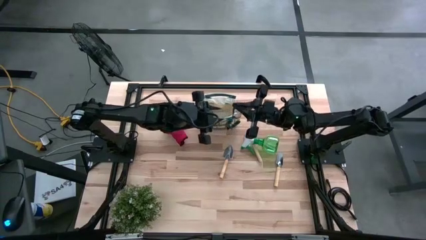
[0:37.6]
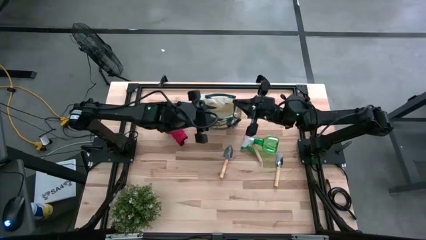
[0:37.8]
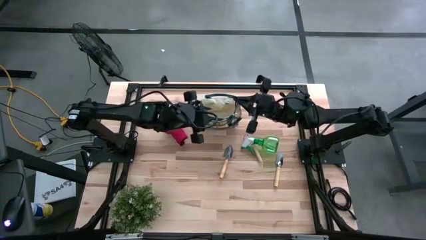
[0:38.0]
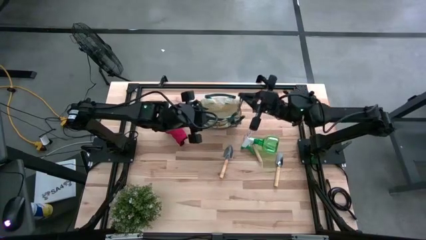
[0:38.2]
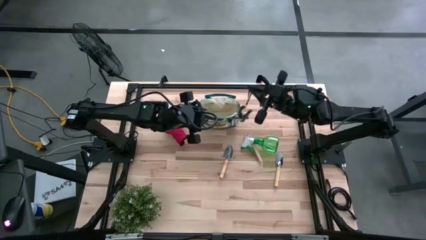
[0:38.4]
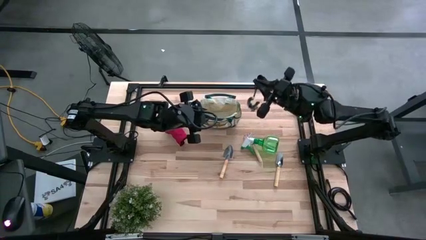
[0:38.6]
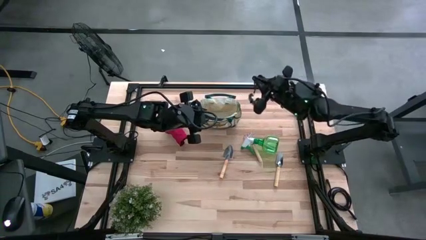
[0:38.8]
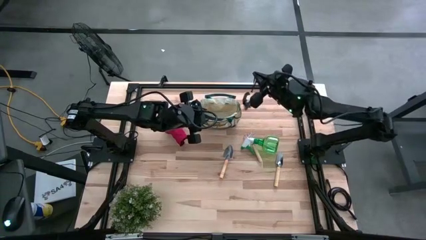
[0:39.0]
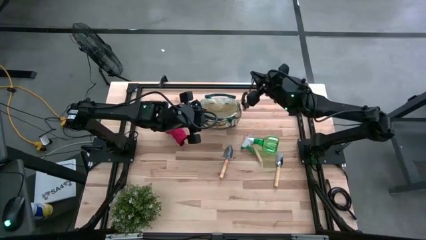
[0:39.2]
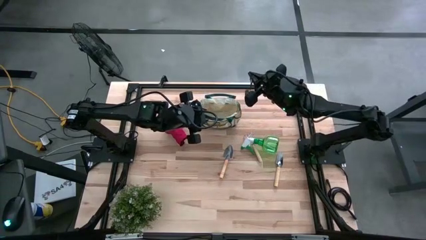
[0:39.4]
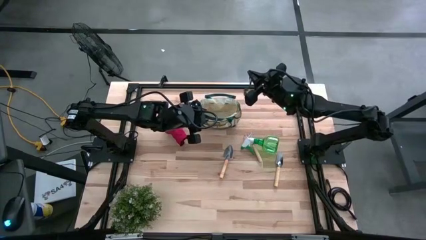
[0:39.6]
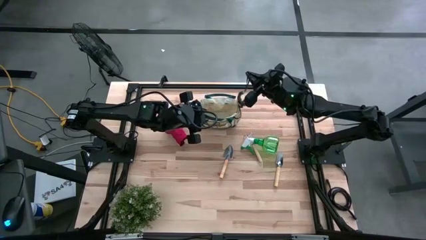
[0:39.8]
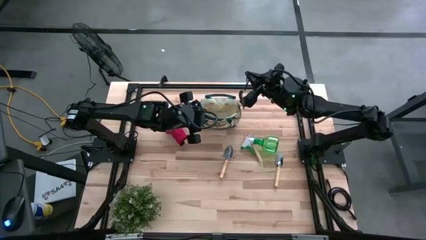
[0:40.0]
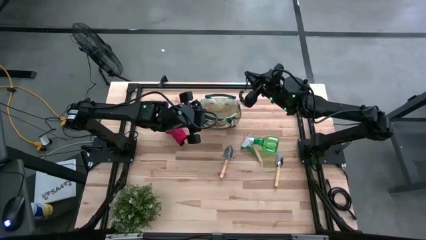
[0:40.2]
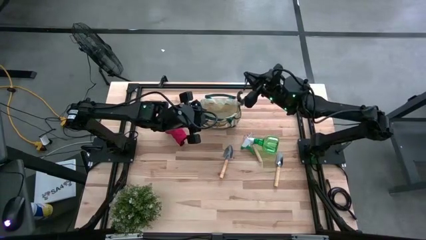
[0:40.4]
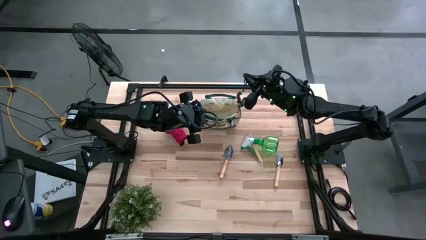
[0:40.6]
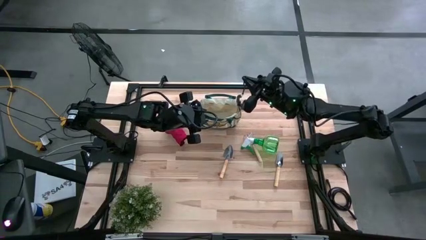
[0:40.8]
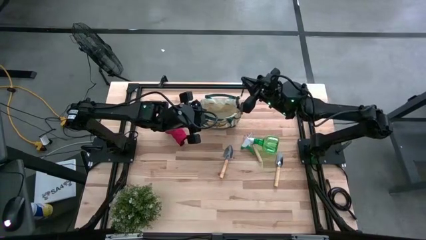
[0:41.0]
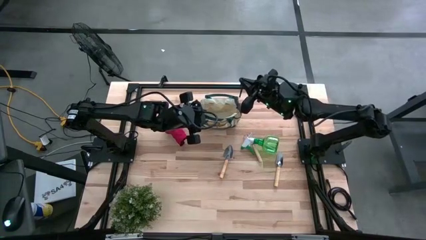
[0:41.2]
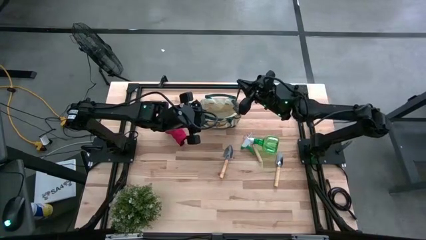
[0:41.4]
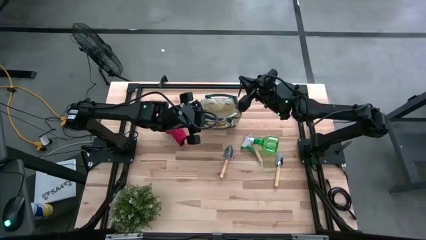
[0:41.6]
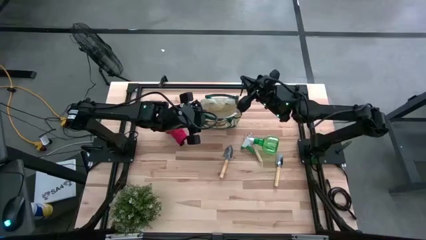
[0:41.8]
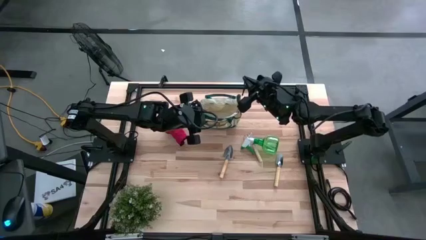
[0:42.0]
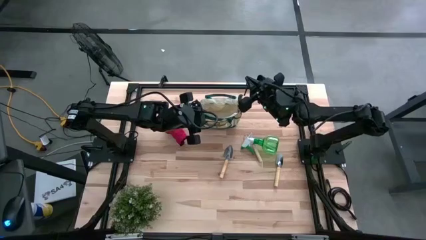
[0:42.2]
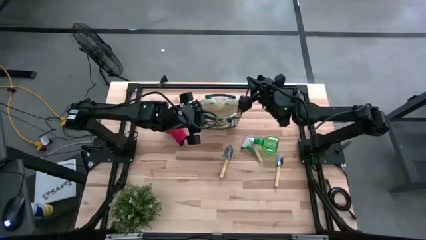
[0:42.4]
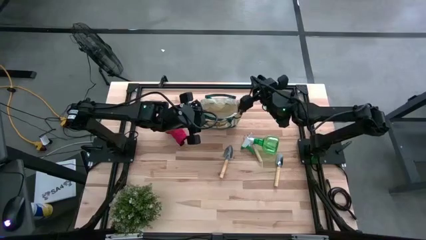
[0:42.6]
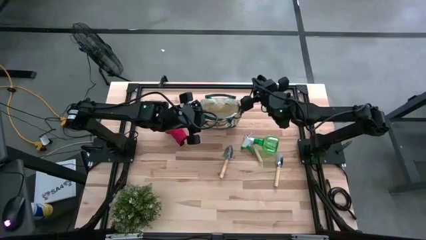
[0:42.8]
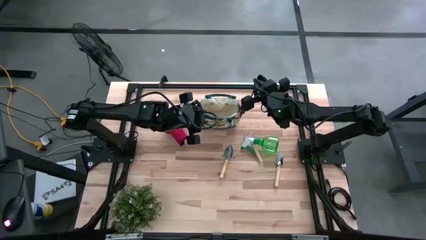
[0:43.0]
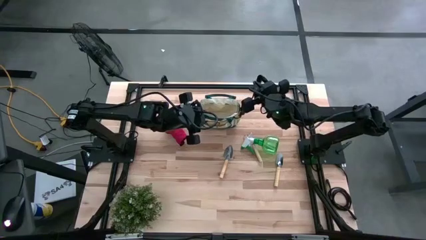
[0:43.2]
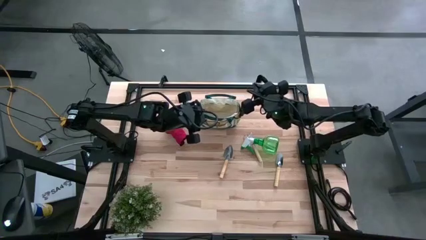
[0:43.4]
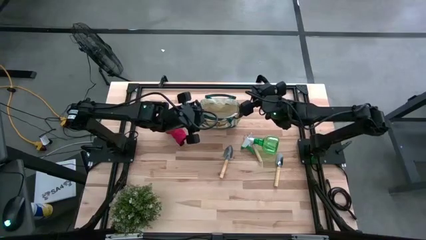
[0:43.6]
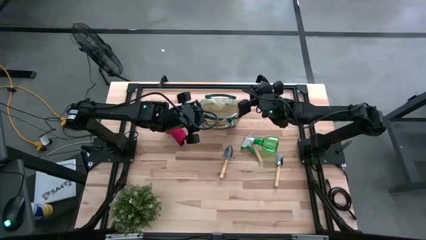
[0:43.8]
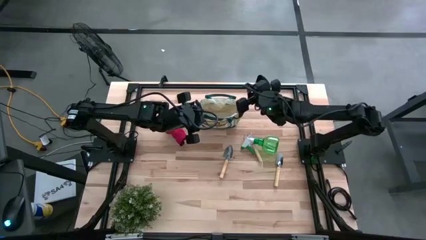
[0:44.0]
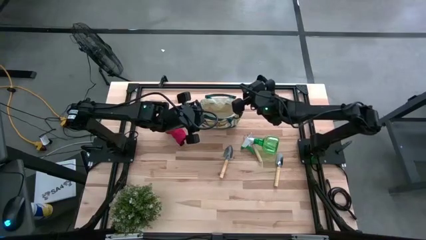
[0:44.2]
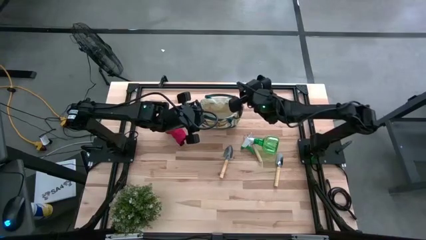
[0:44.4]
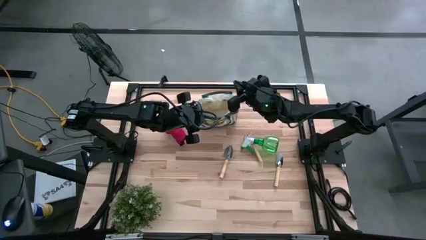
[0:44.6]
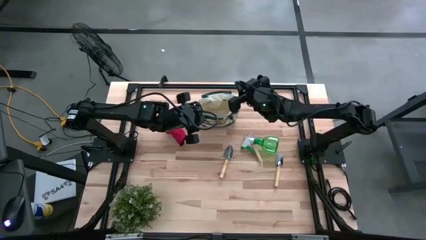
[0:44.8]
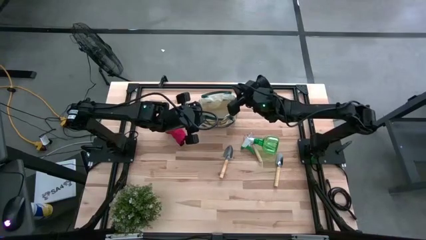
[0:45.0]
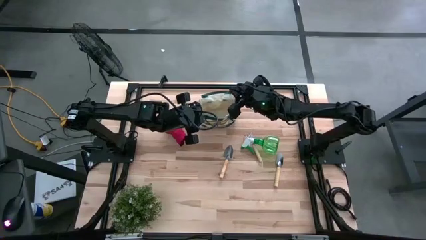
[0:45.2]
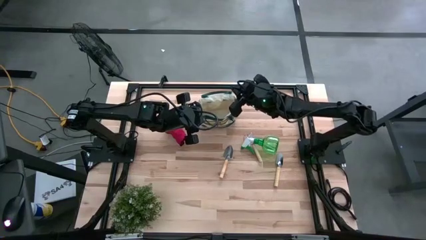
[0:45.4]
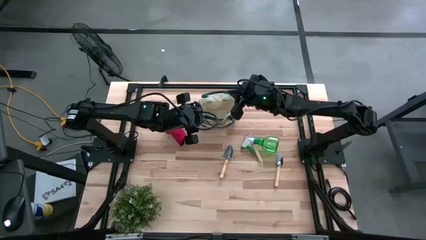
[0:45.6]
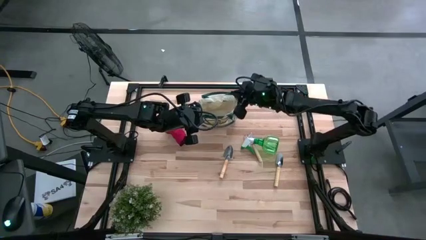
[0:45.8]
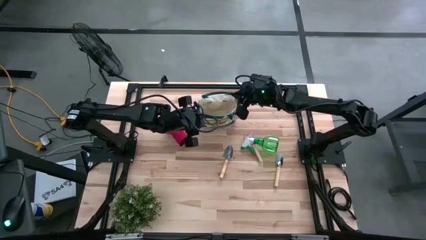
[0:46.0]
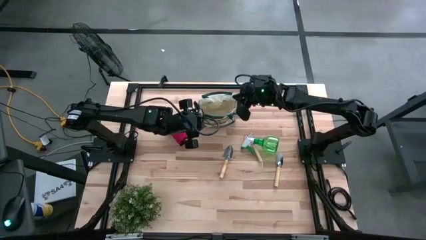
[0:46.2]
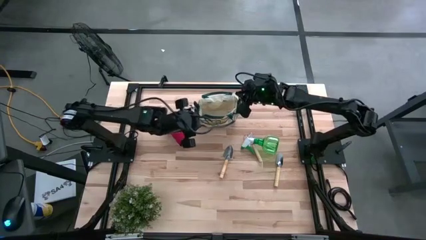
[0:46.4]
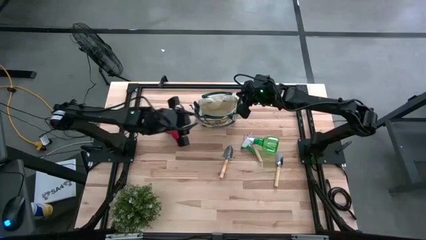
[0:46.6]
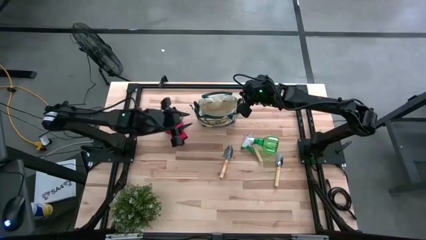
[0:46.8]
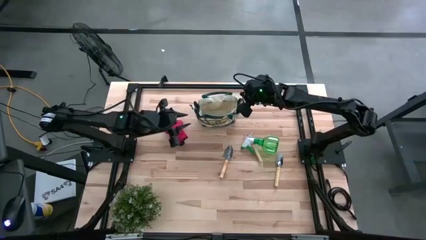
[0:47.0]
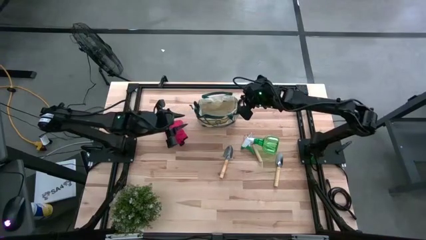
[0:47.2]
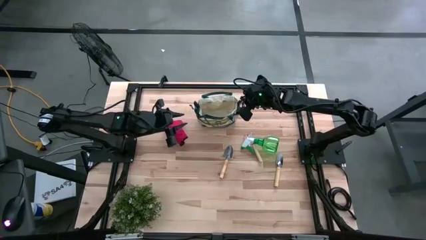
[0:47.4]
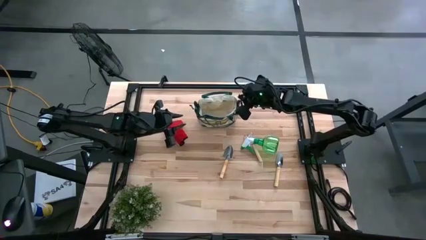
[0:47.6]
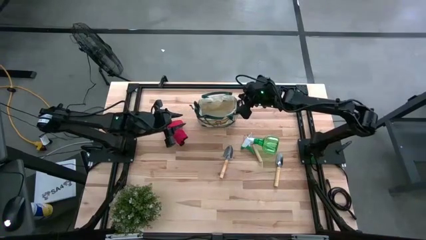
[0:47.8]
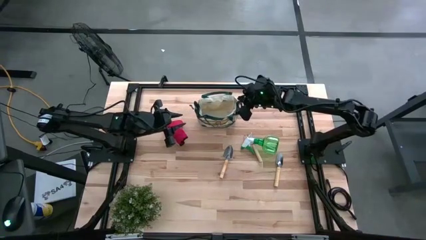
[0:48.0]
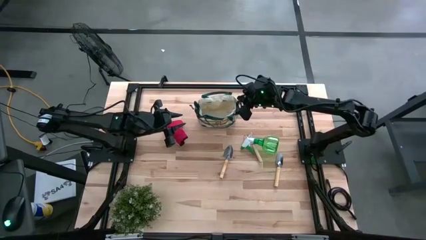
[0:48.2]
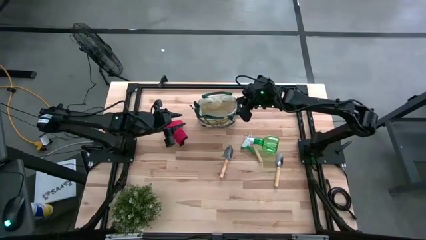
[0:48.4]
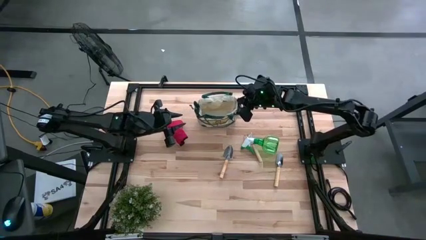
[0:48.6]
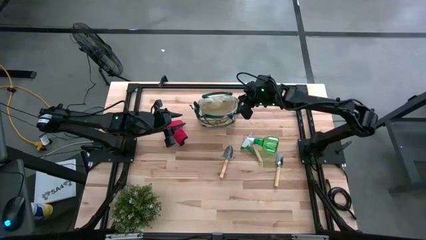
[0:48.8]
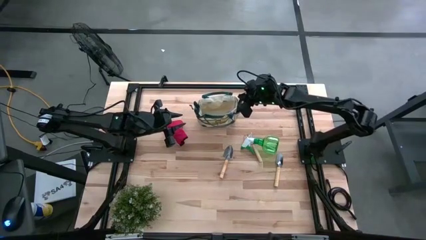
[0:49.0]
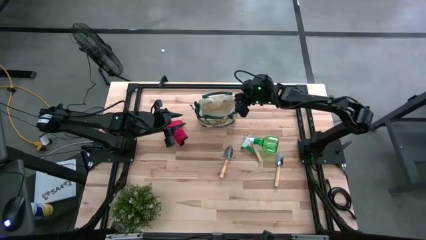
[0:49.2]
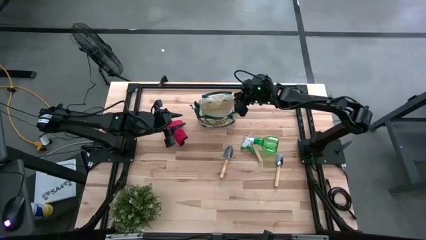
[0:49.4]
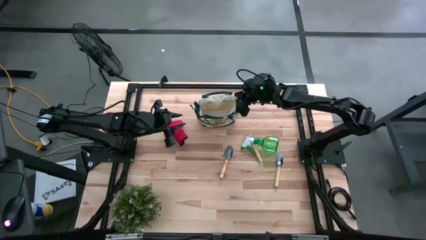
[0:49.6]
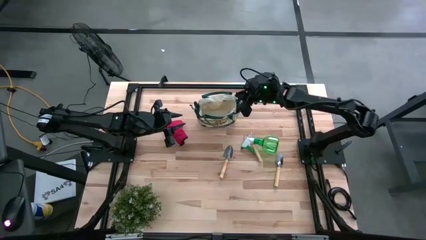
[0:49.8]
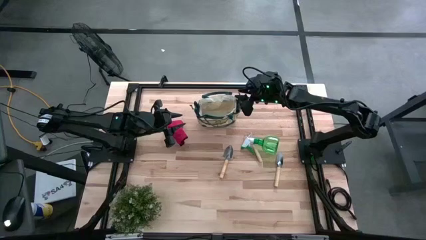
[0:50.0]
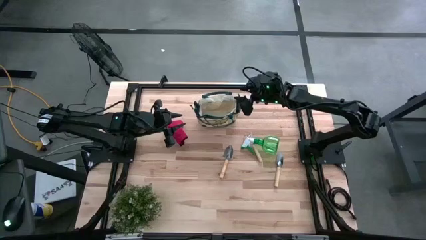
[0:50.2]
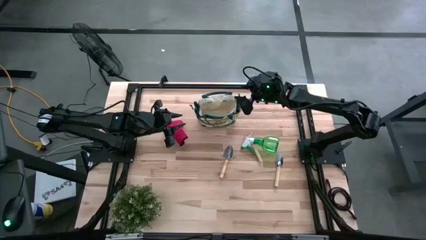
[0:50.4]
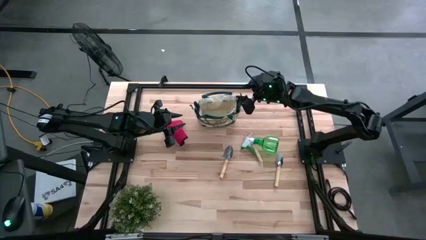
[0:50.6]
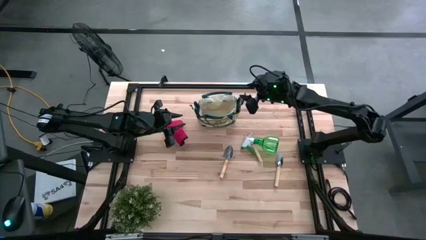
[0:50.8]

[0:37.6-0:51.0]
Task: Pick & Place Garden tools in Gardening bag
Put the green shear scissors into the gardening bag

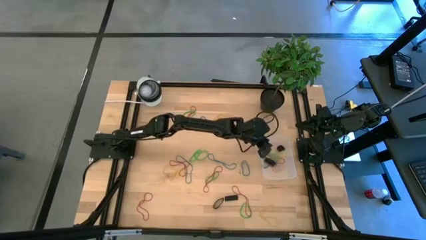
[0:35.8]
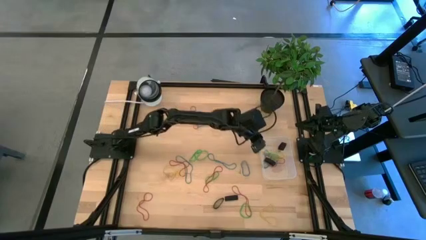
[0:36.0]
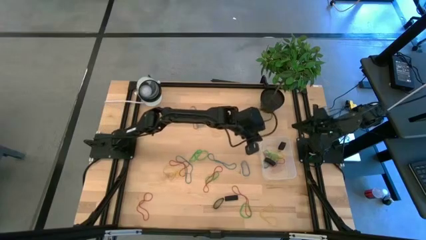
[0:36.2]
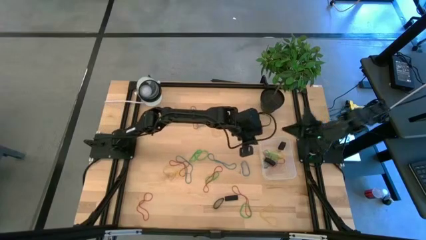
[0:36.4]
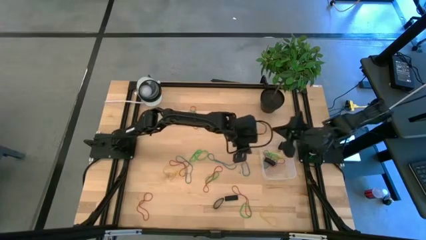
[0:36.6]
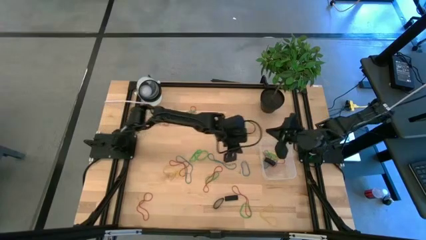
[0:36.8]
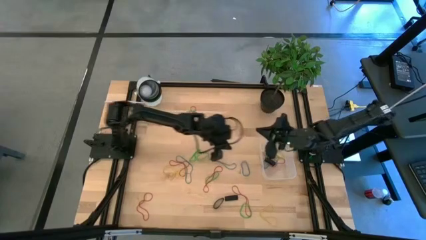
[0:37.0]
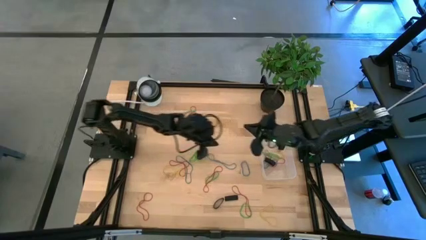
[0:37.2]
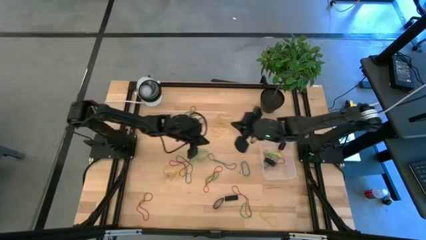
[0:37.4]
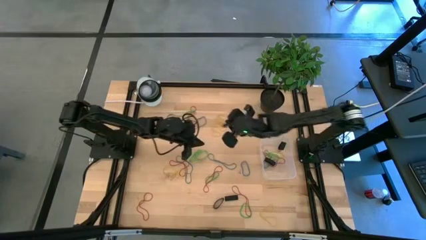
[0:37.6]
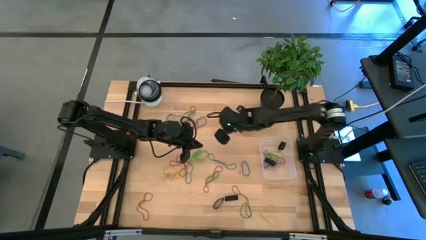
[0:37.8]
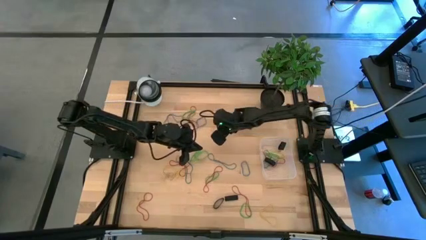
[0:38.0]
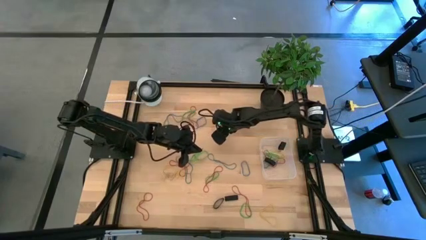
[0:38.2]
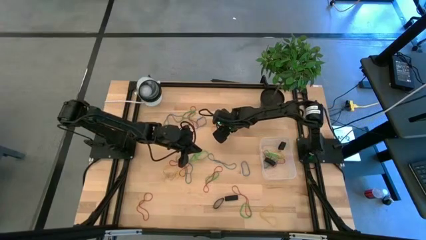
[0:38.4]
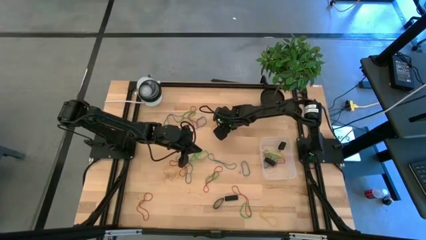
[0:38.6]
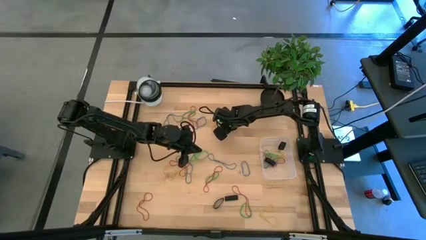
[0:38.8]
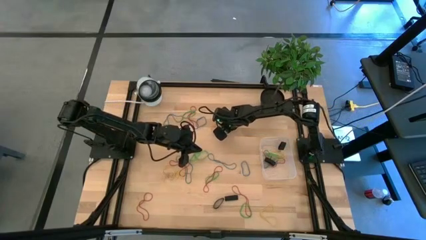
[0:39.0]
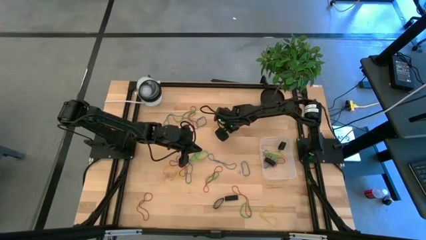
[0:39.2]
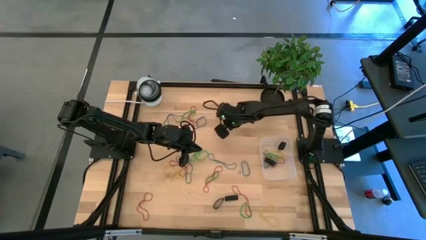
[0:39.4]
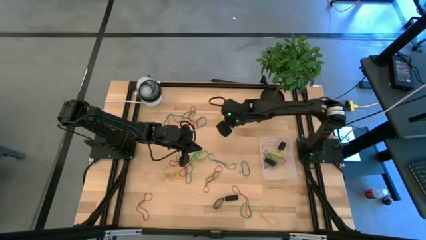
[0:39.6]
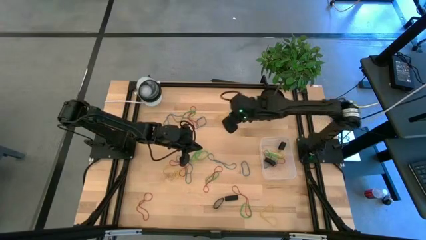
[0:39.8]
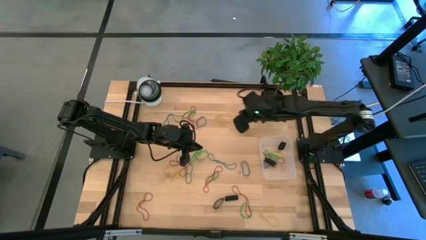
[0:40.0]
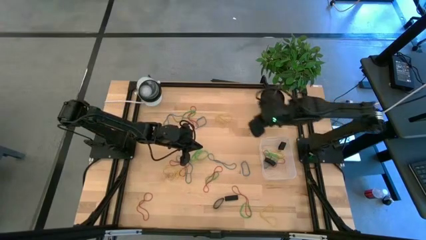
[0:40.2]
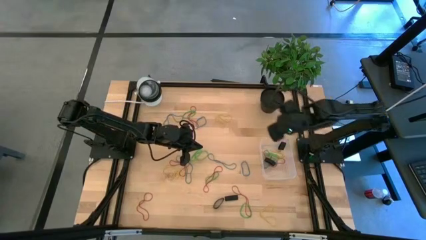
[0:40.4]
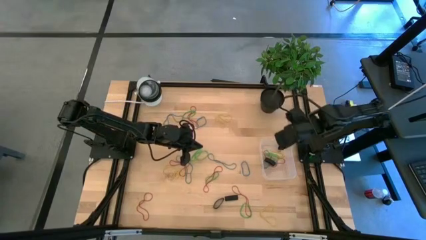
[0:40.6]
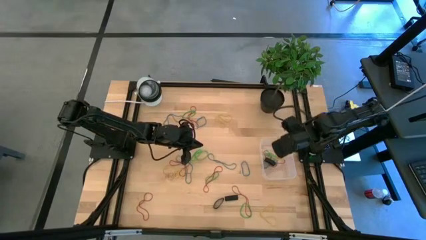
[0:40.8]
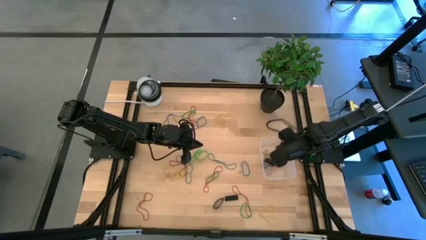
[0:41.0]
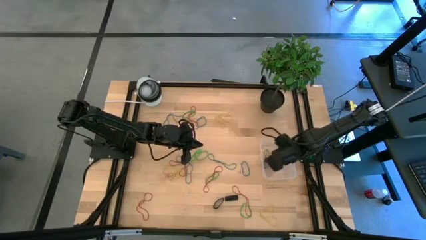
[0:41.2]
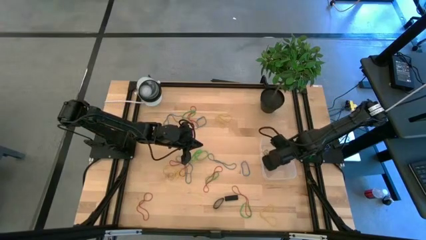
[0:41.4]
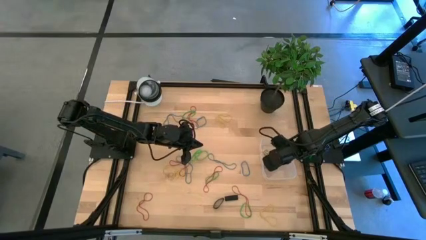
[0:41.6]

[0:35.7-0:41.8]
Task: Pick and place rubber bands into bin
Put the yellow rubber band into the transparent bin
